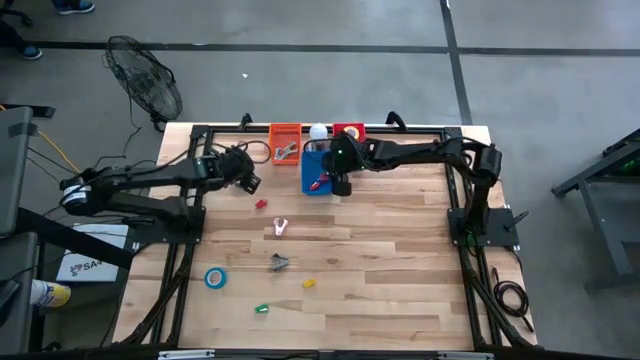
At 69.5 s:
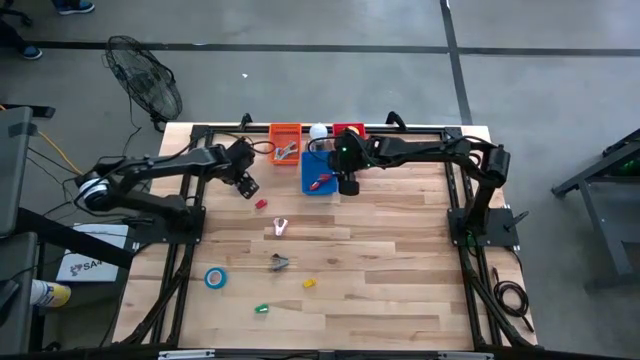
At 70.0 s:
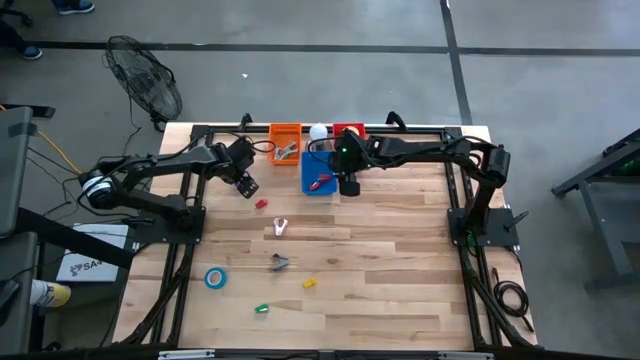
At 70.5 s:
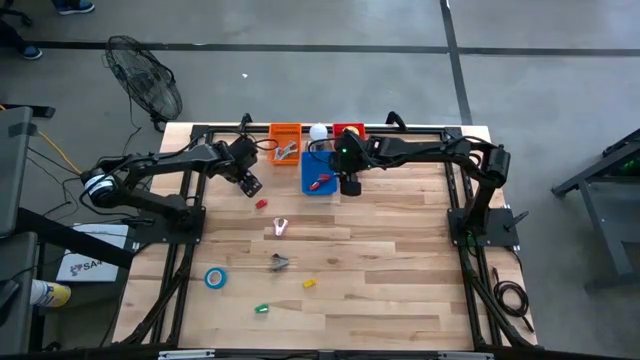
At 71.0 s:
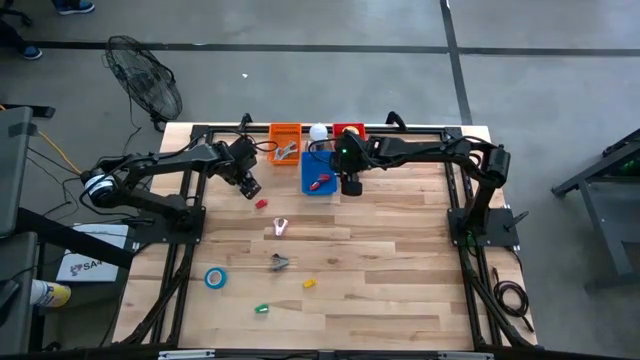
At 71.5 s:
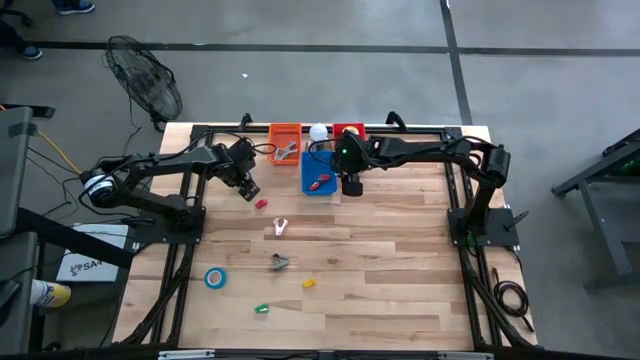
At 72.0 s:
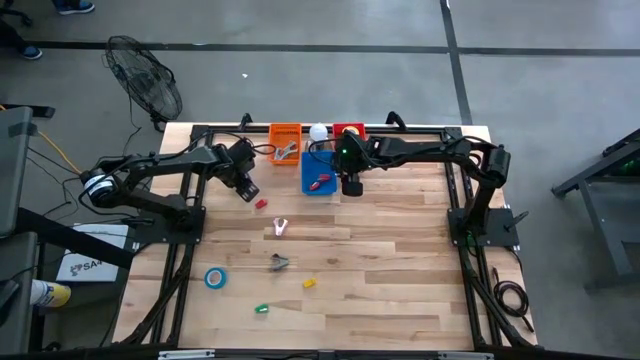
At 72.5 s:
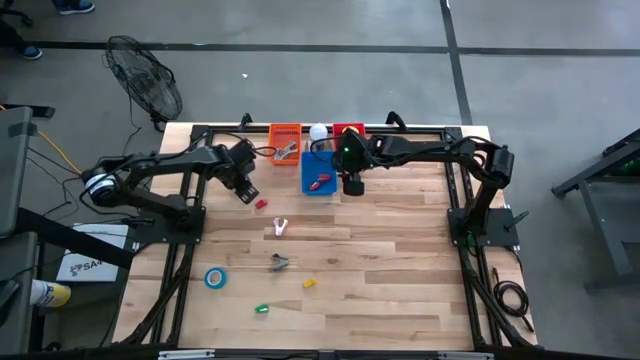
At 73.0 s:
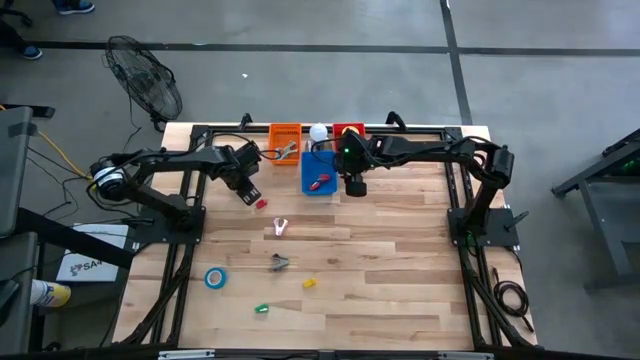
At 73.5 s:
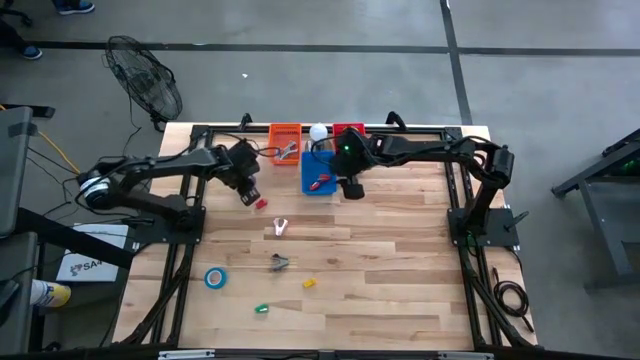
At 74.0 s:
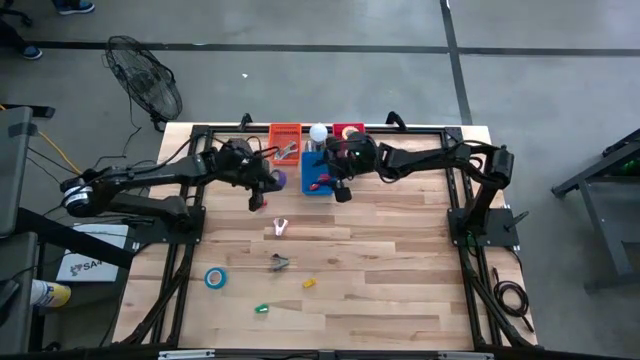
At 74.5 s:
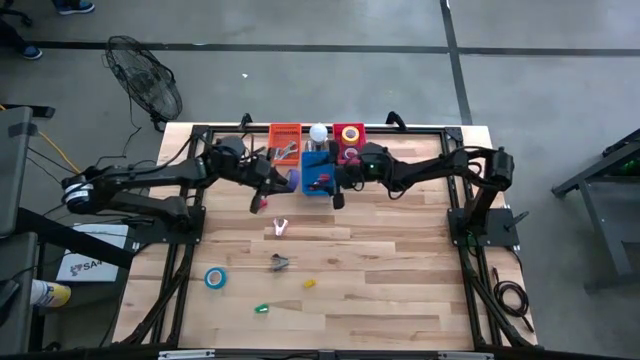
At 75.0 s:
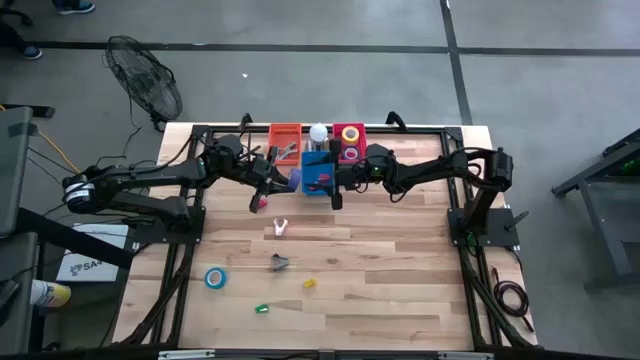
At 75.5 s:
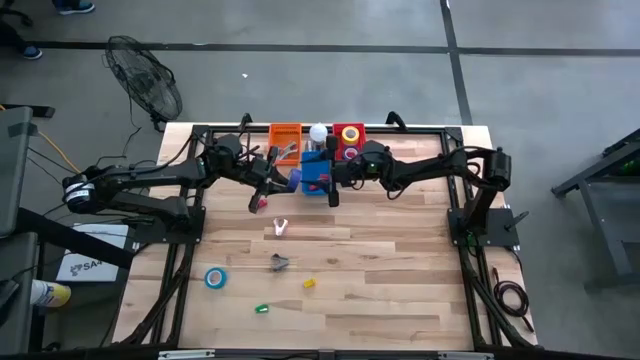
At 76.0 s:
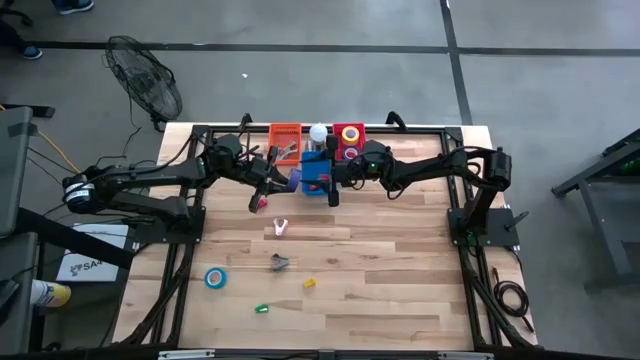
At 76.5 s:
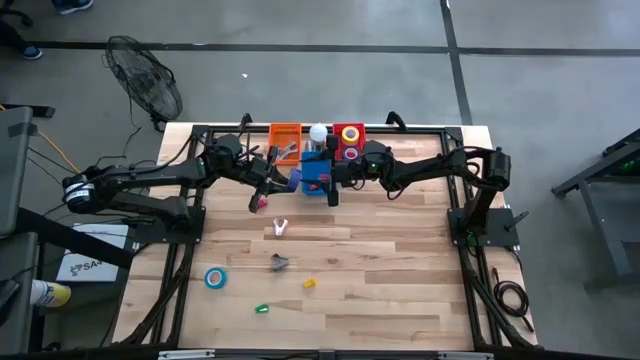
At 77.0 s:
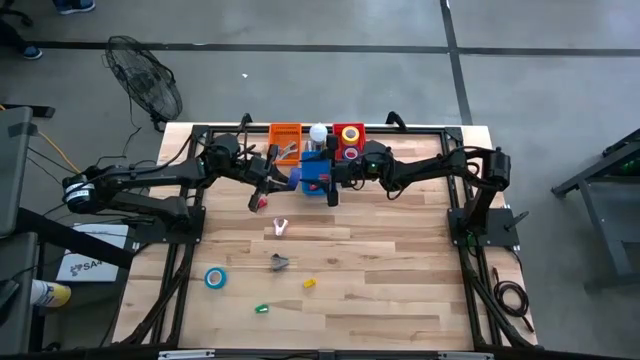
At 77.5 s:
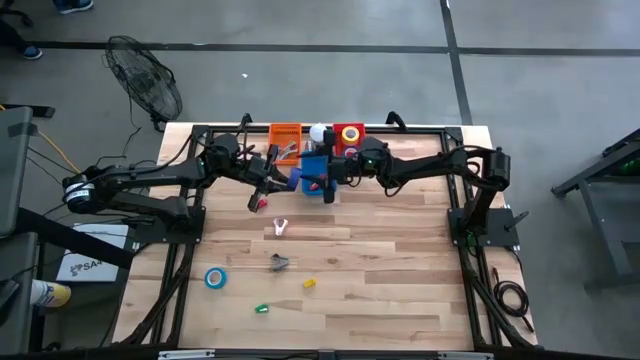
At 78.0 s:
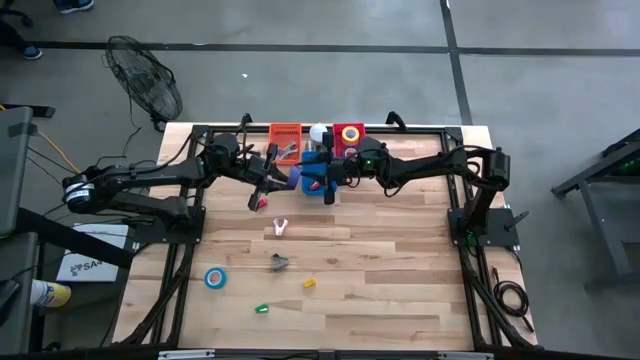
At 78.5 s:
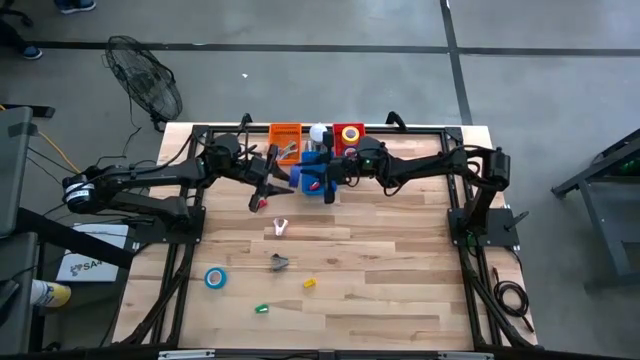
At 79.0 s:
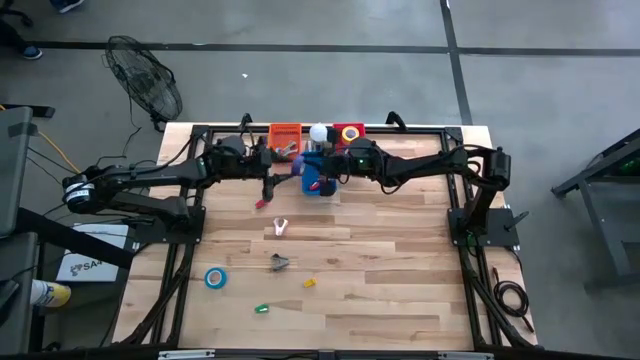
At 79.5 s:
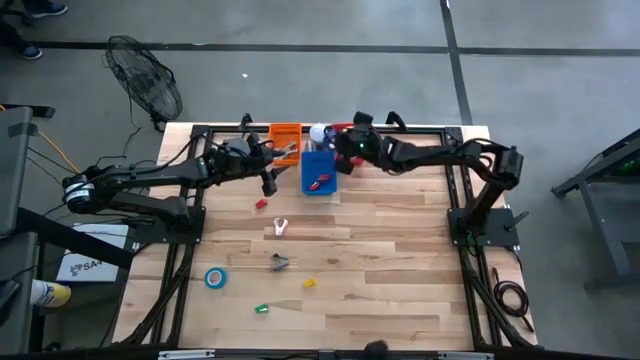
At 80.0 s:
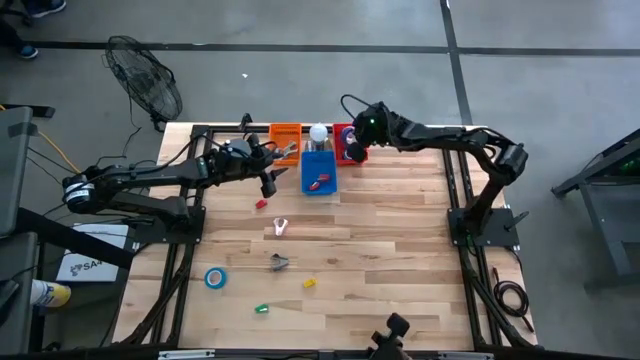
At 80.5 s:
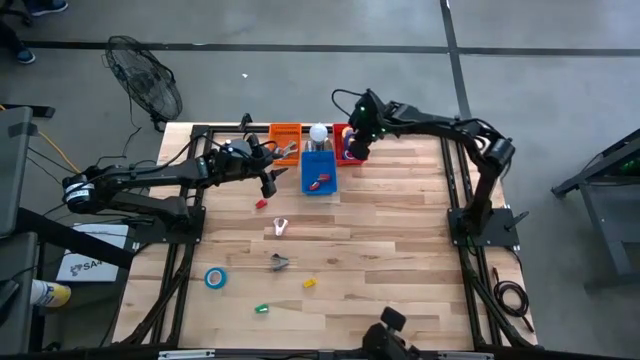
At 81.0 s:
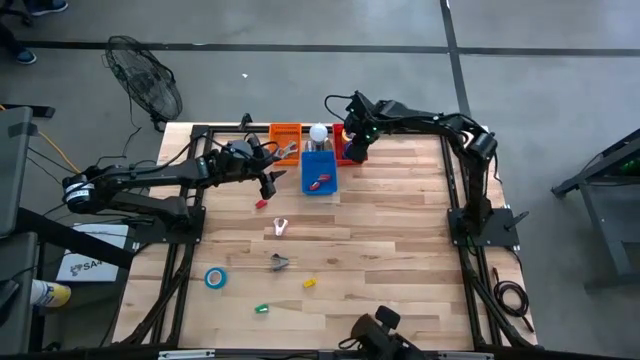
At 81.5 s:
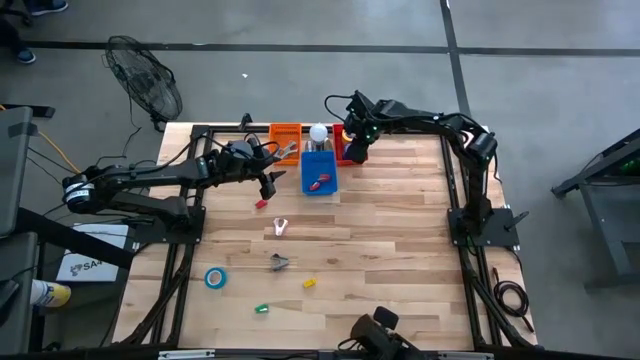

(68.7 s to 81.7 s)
Task: Pick and place Stapler, Stapler remover, tape
Put the purple tape into the red basket

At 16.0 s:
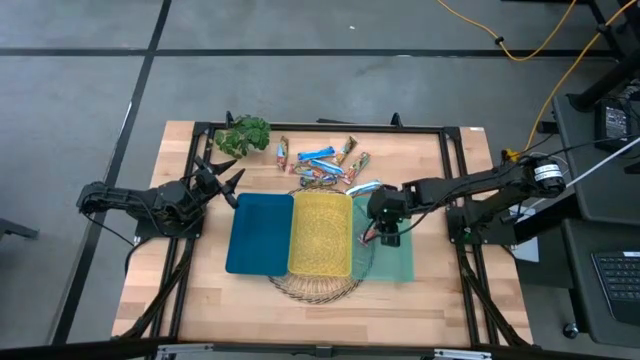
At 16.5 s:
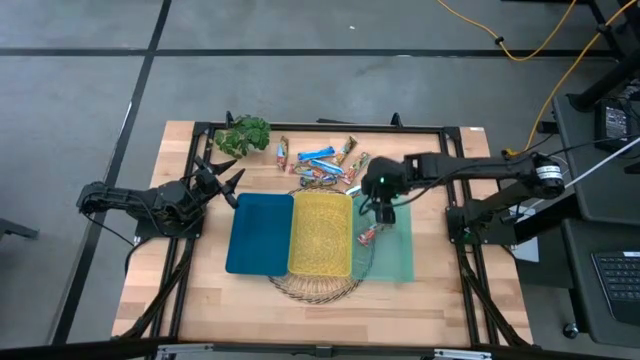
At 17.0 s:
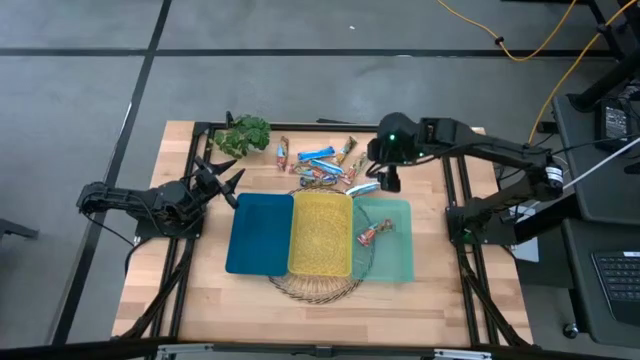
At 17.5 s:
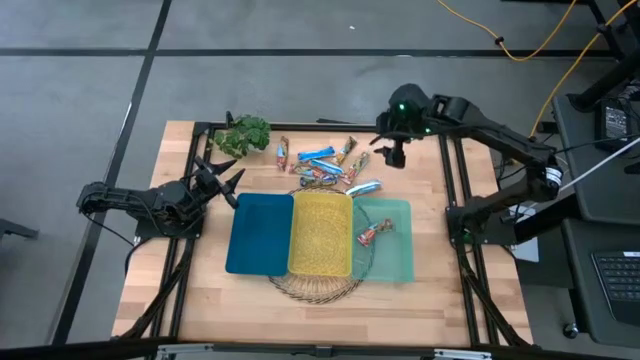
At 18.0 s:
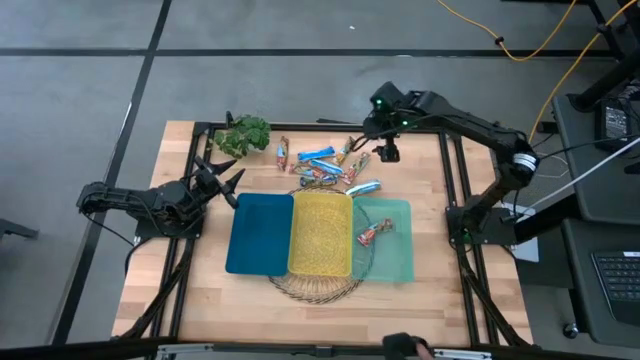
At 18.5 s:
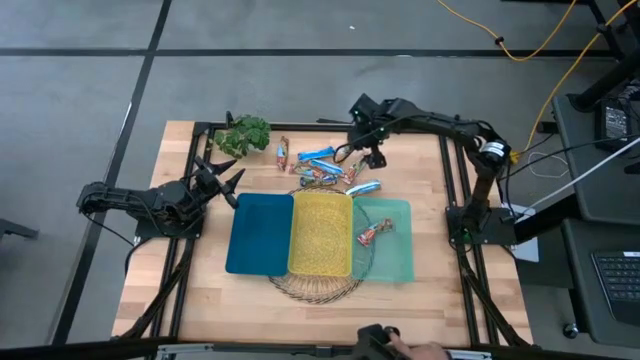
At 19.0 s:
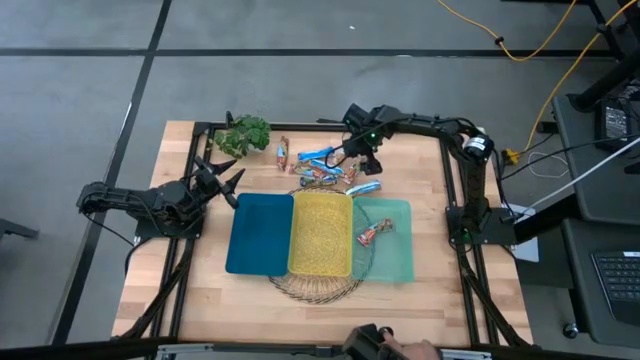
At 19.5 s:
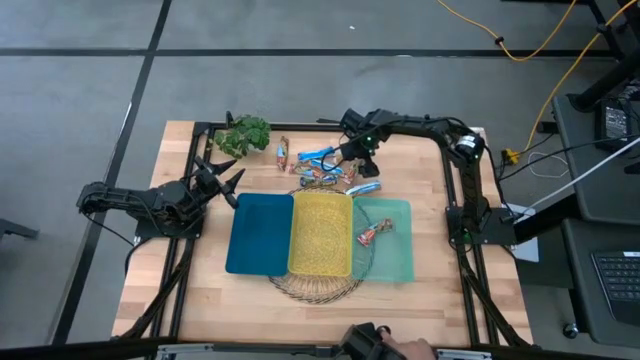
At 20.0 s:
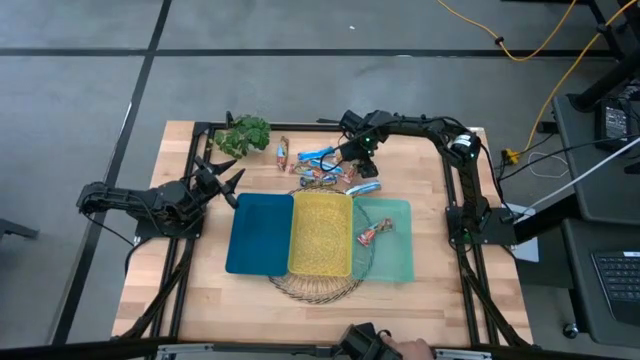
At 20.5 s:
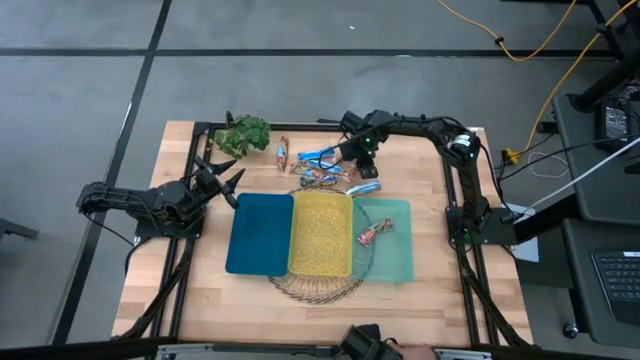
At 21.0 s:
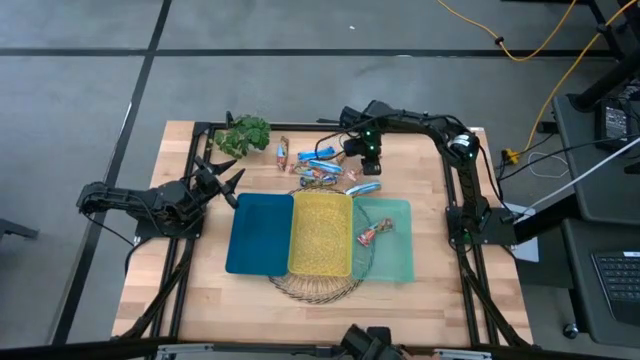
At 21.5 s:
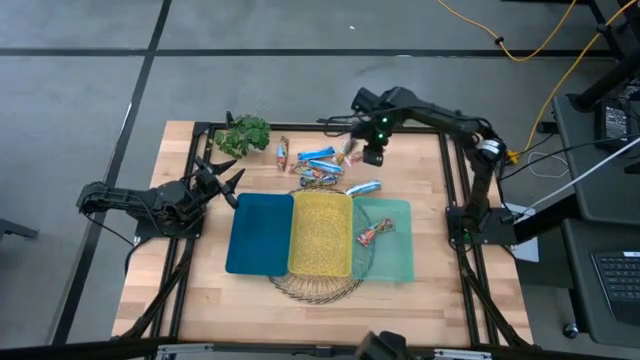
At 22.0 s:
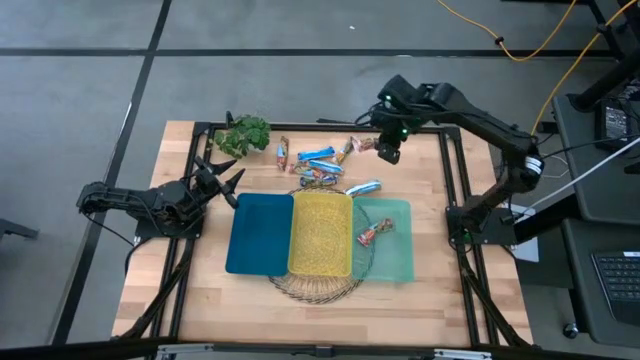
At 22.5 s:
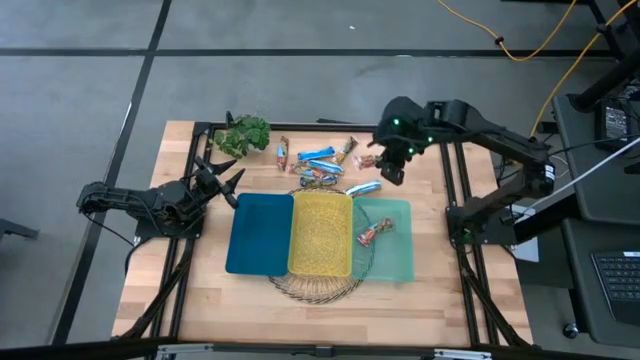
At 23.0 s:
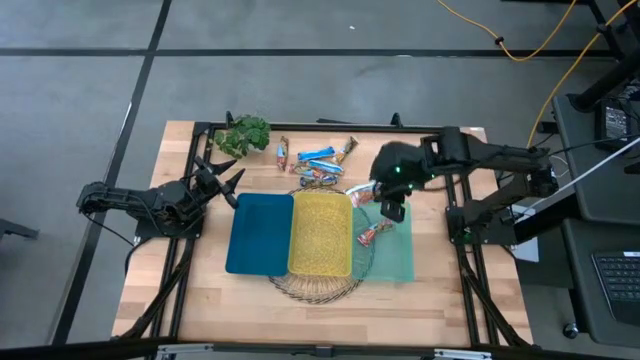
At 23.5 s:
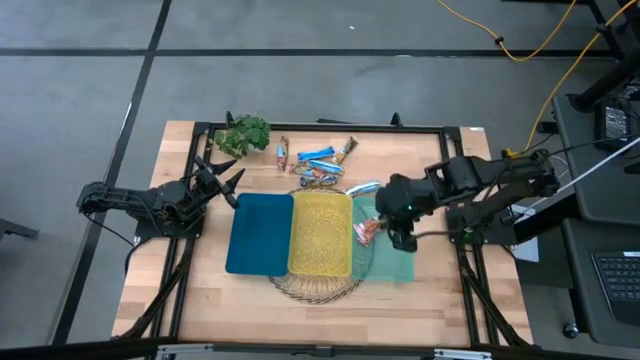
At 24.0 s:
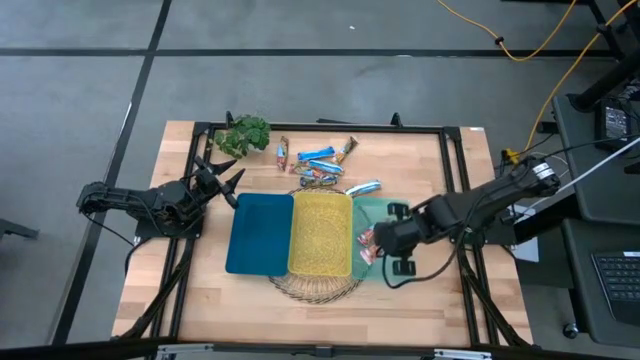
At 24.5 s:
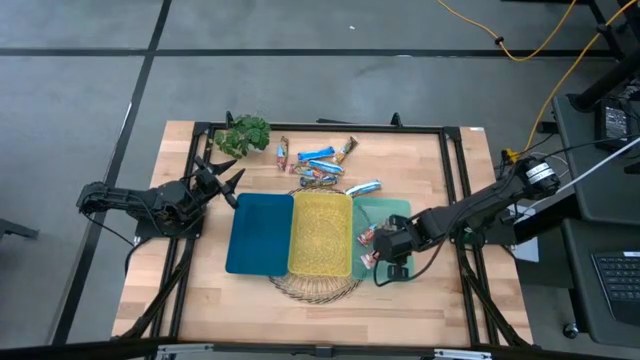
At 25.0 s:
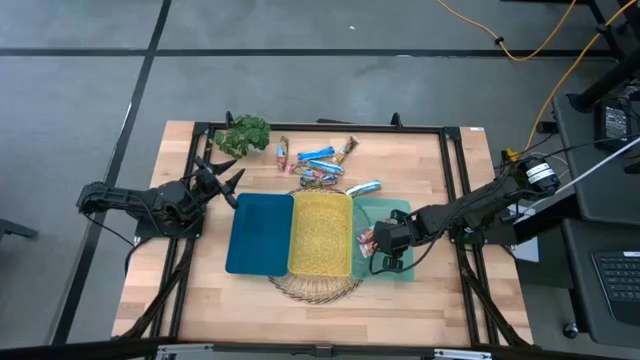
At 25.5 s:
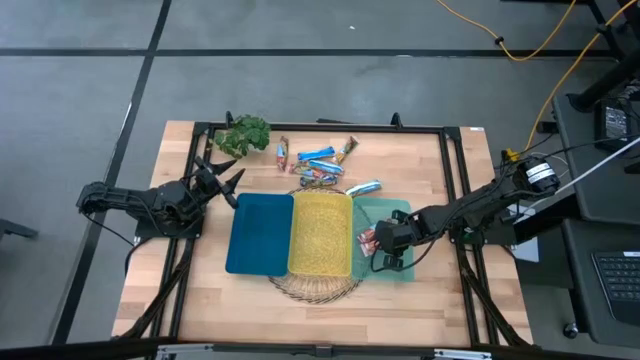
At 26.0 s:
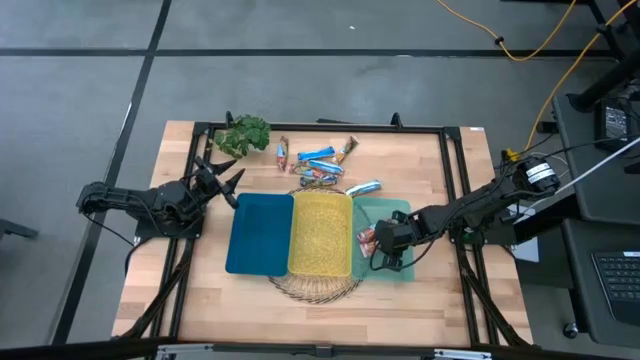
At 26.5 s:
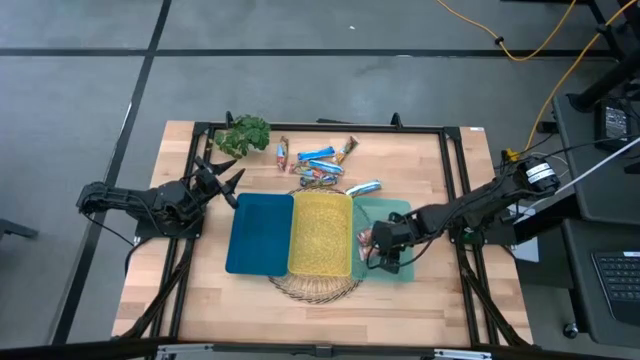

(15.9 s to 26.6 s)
Task: Pick and place Granola Bars by type
Put the red granola bar into the green bin
